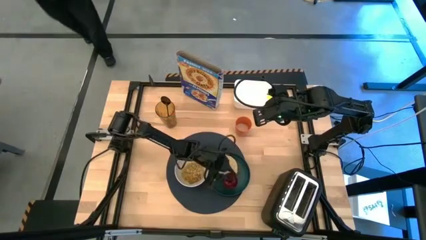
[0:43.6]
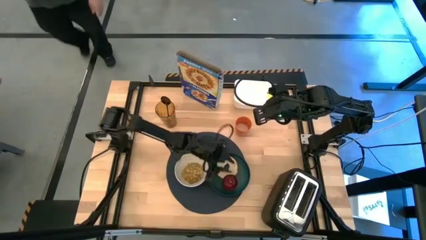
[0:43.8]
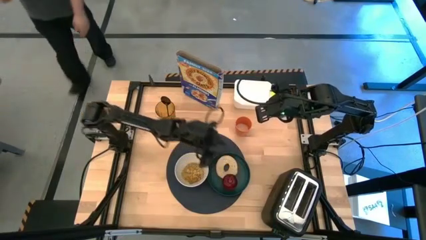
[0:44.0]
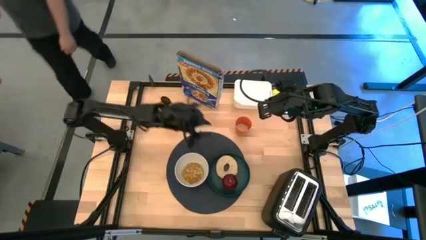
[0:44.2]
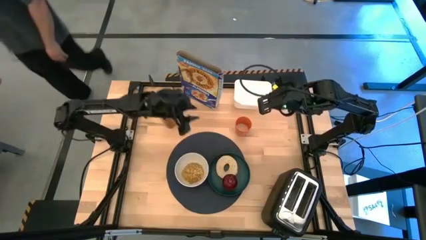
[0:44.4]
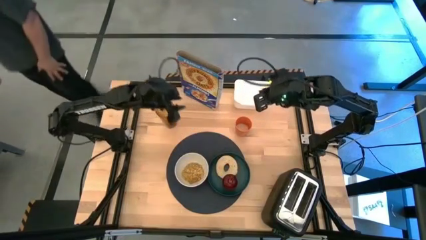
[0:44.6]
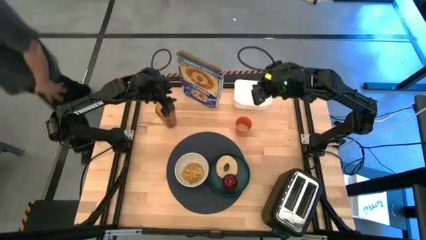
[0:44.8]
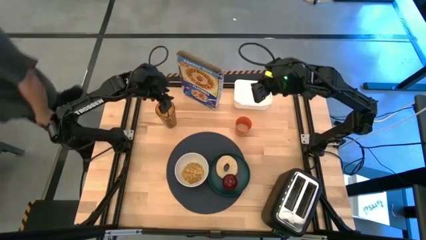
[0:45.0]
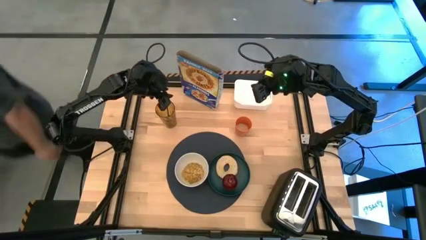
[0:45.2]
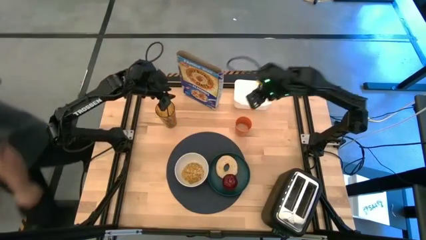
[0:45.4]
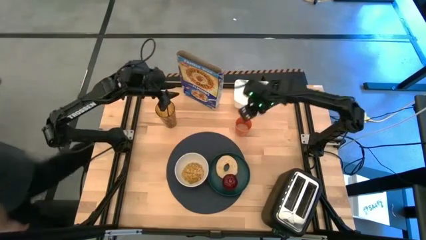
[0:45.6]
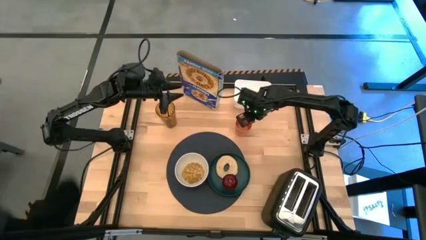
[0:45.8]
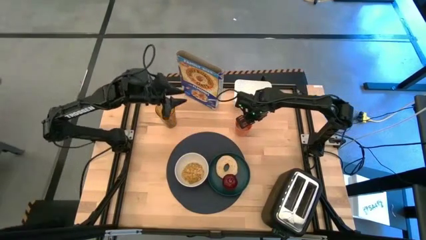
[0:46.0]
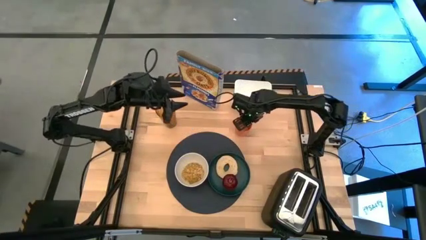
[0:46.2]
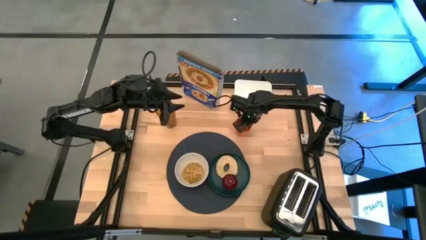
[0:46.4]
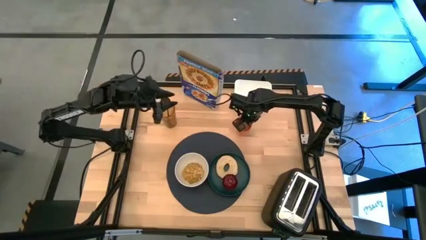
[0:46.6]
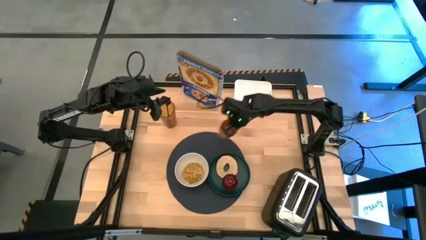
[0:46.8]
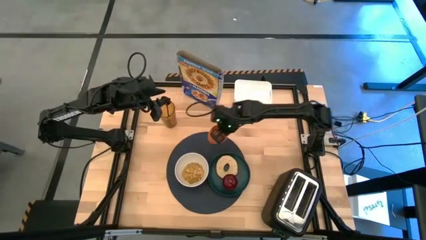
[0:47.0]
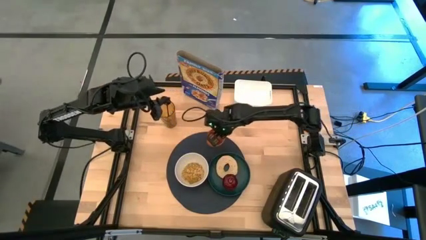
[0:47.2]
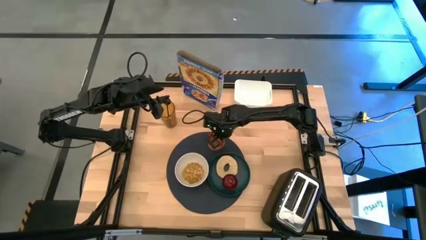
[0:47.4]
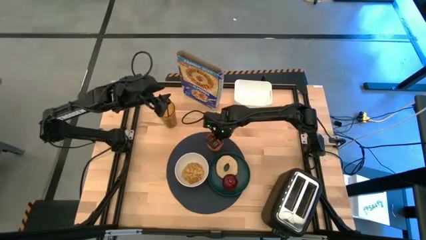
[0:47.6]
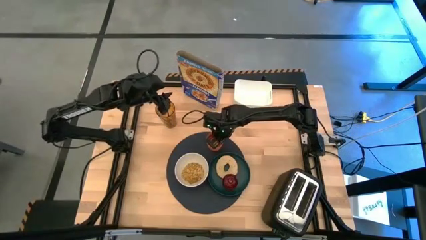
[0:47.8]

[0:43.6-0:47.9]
Task: Arrange a breakfast setting
Put the orange glass of milk on the table mat

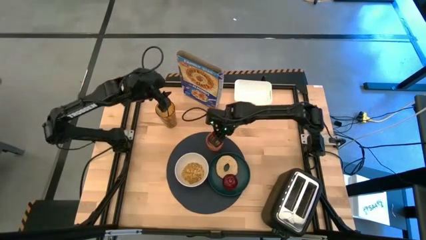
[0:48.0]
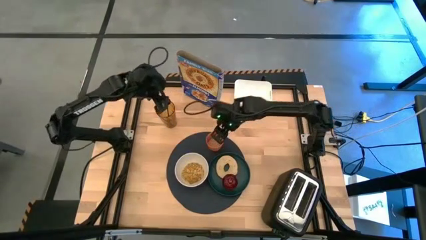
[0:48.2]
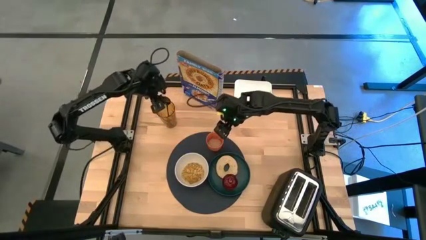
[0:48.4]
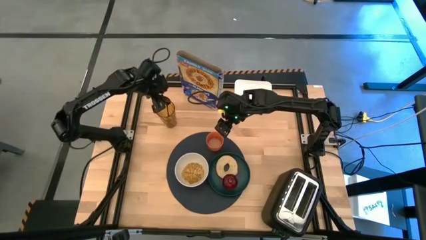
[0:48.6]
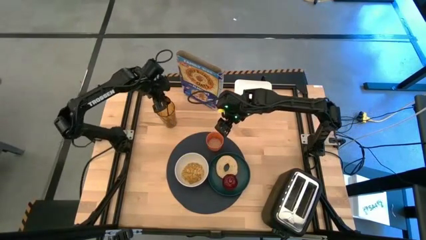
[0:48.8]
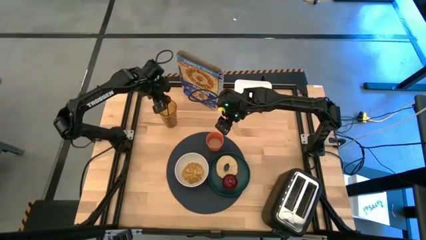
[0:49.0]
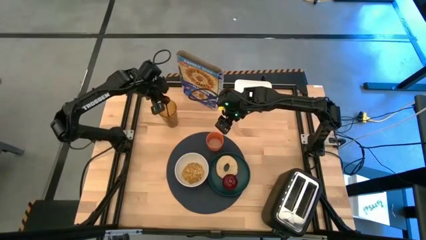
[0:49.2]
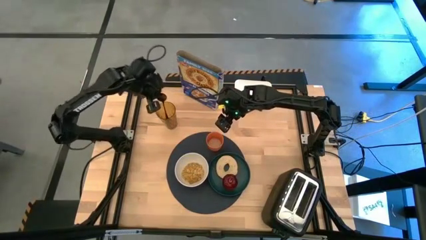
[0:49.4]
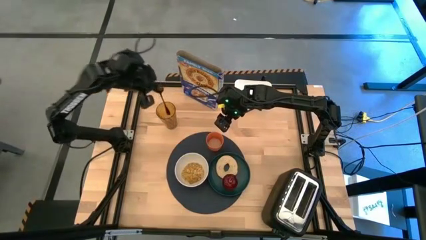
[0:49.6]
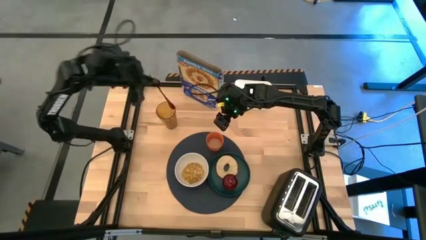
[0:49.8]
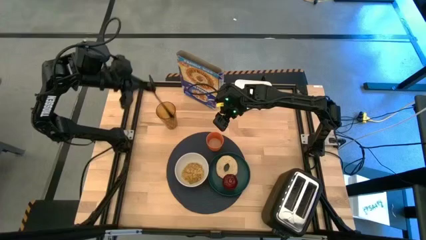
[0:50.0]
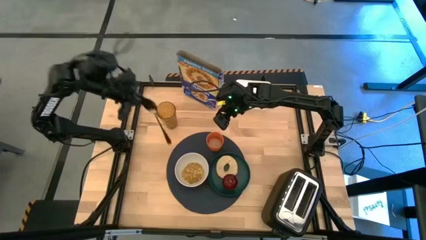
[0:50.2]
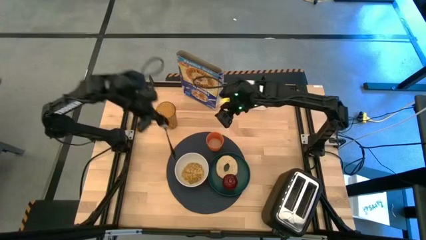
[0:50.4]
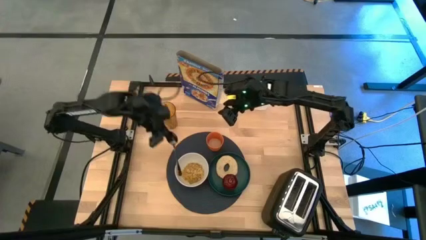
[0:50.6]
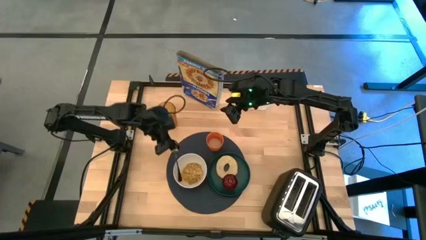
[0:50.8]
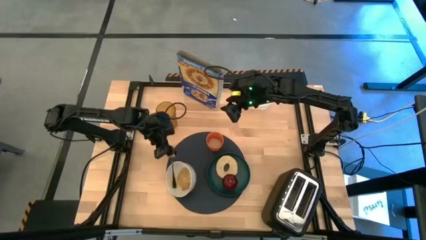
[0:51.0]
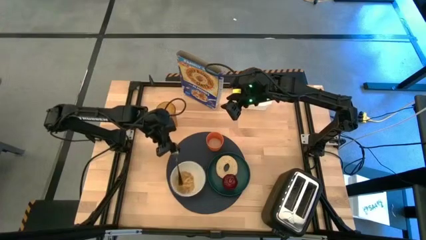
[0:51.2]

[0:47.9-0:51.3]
Put the metal spoon on the left side of the white bowl

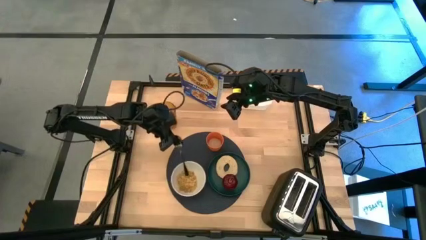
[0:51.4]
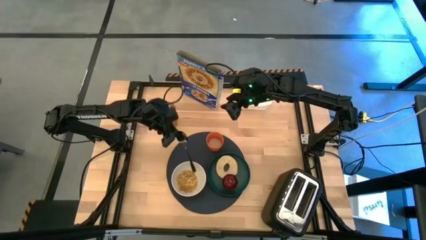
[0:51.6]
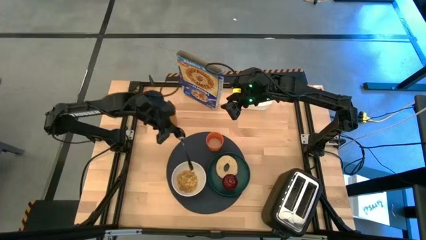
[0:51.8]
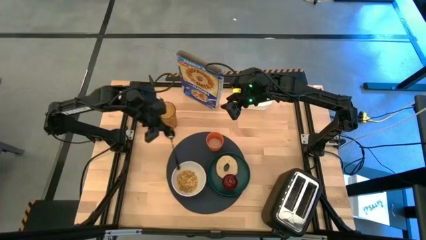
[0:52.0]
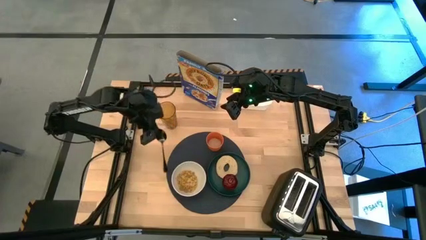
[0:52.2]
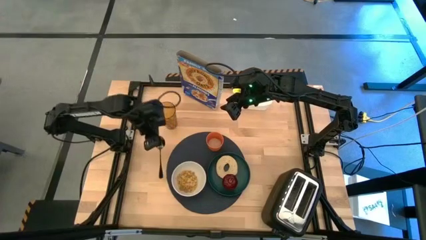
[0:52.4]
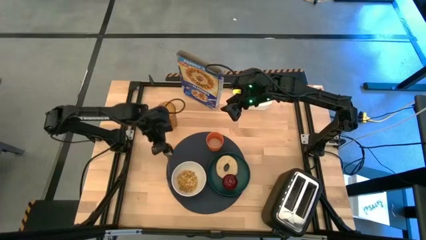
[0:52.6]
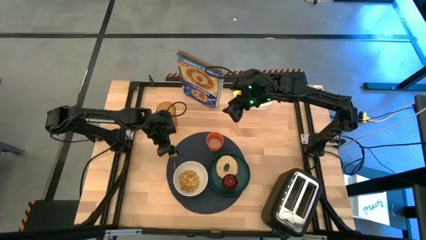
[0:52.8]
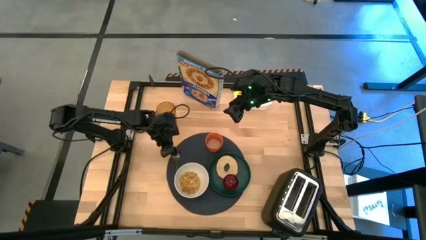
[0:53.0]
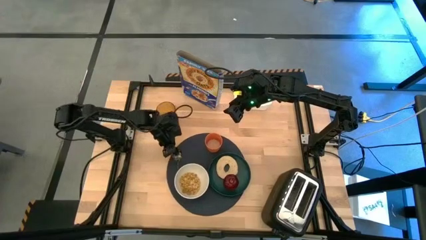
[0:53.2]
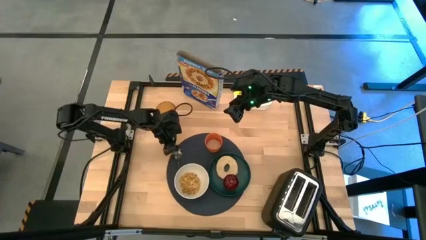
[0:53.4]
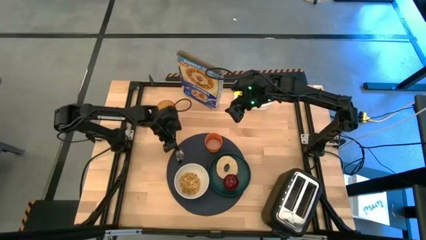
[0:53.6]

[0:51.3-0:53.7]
Put the metal spoon on the left side of the white bowl

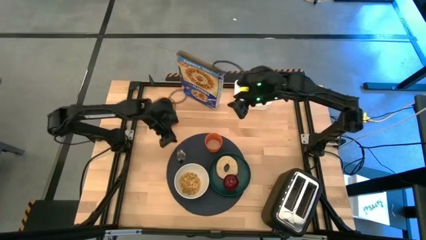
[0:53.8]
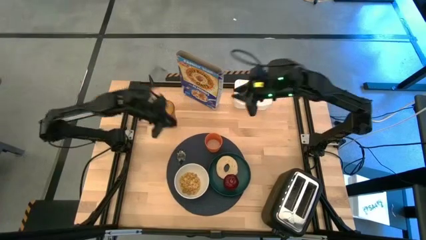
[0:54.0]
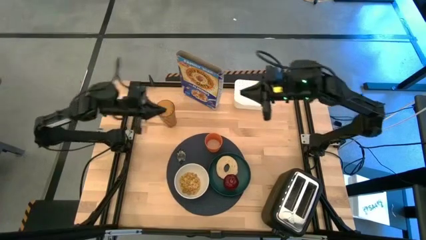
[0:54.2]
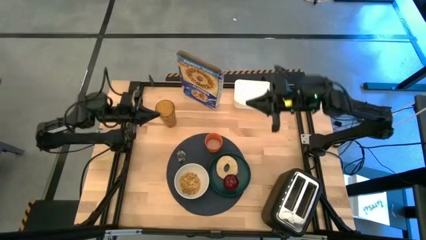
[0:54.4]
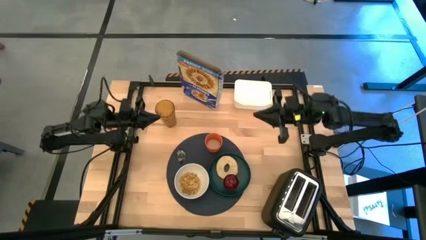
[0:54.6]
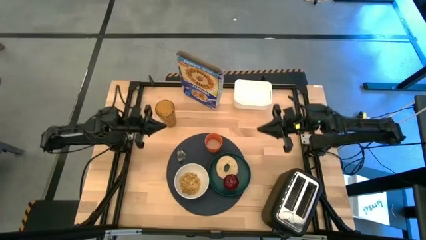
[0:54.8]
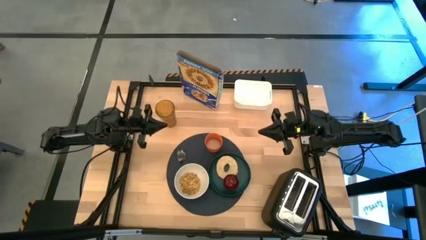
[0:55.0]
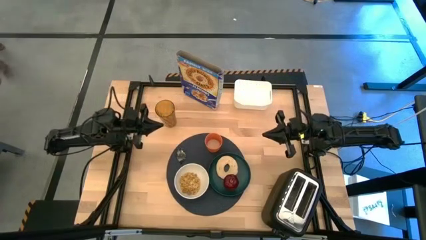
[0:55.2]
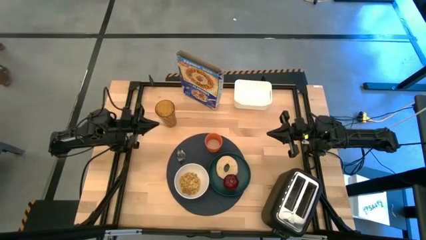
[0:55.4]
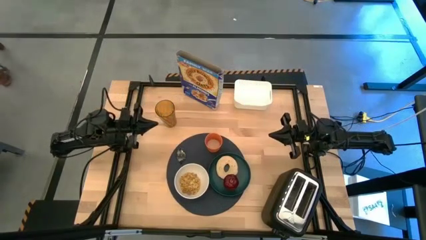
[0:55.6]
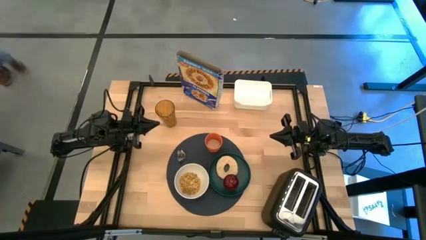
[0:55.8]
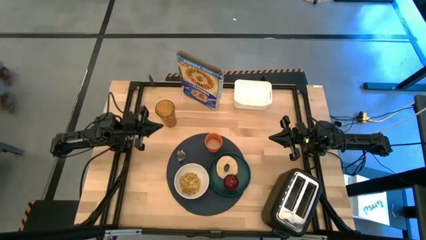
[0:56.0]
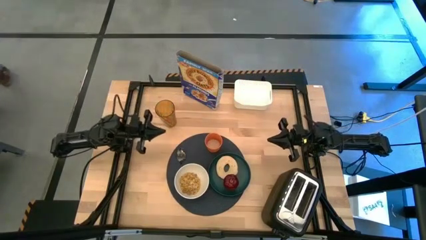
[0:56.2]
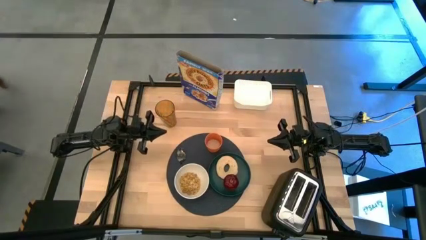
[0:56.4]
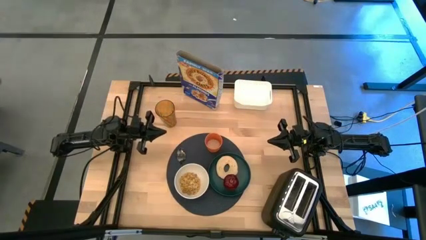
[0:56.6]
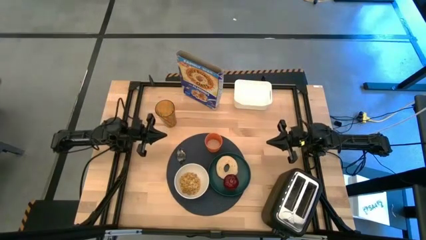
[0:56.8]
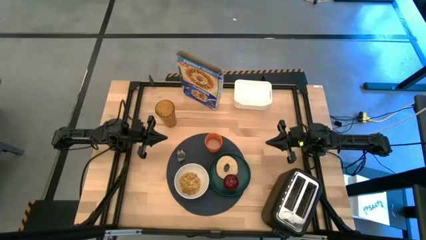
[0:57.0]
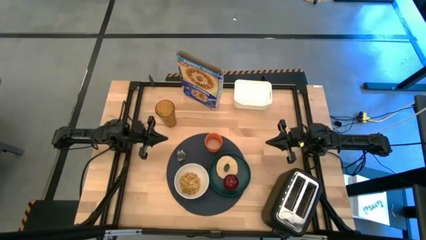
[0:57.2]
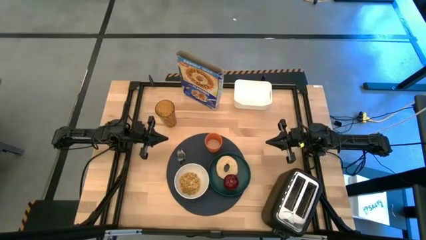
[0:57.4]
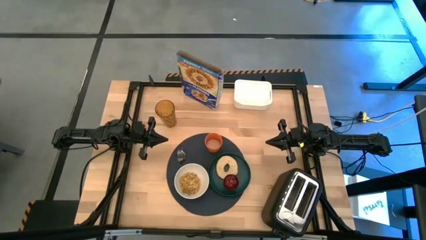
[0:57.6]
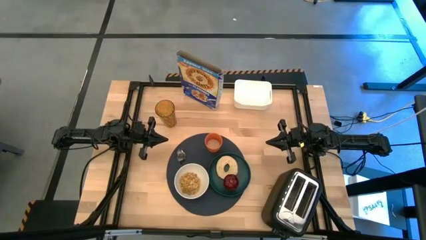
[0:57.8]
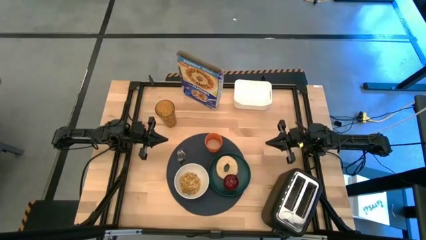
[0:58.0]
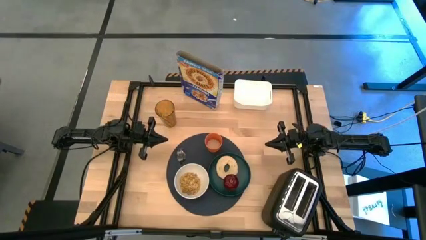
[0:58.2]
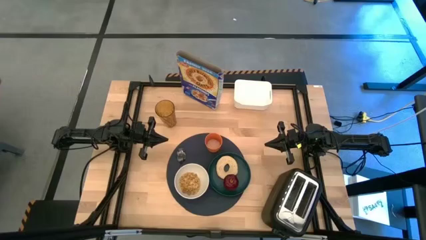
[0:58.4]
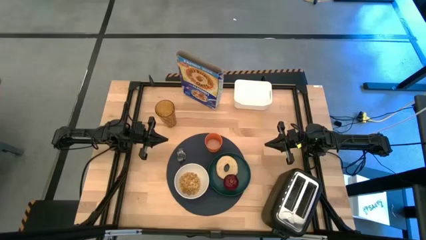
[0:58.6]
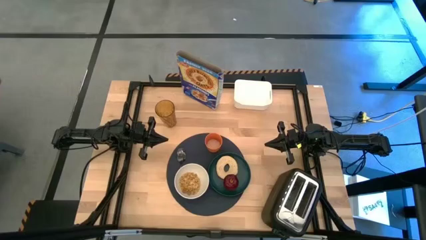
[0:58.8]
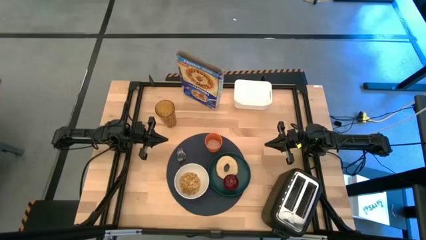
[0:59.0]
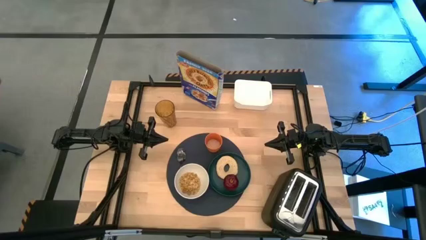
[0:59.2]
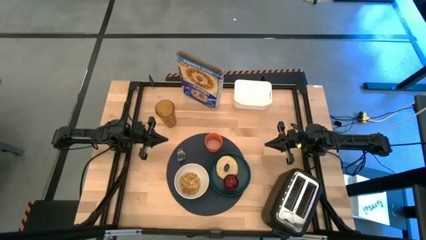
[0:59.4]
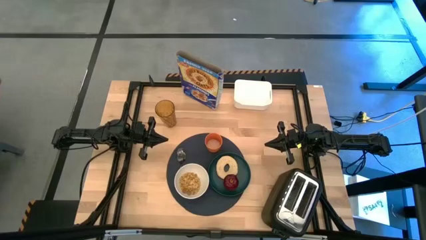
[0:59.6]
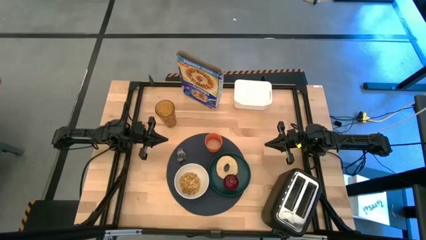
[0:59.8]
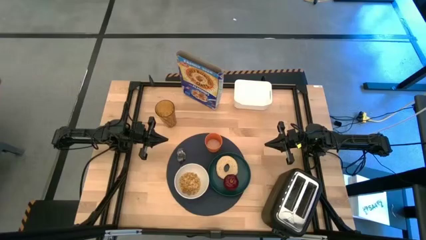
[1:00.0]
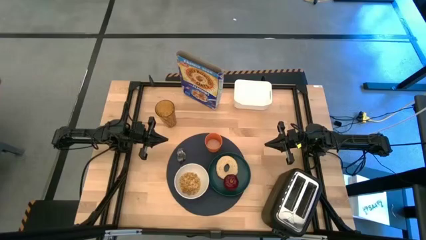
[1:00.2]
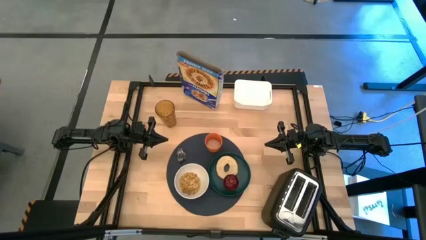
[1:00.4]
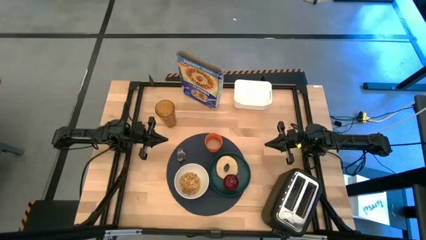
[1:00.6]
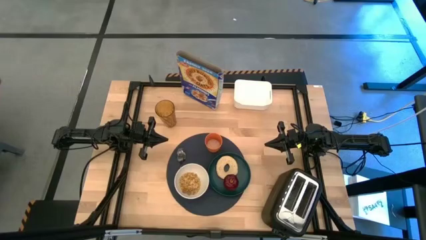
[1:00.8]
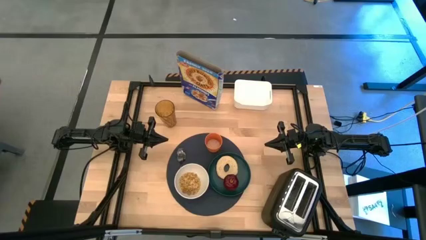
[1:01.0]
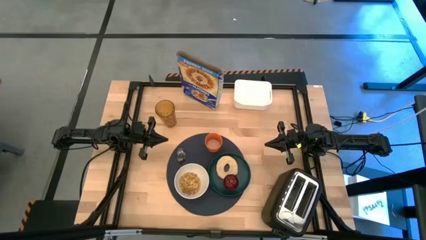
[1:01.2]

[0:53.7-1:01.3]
Return to Home Position
